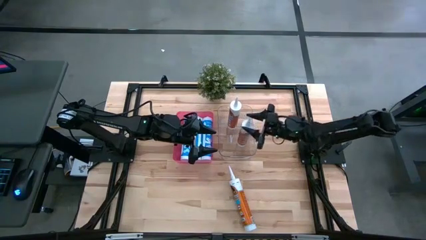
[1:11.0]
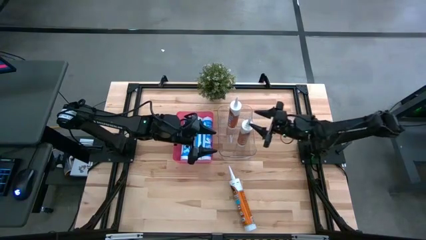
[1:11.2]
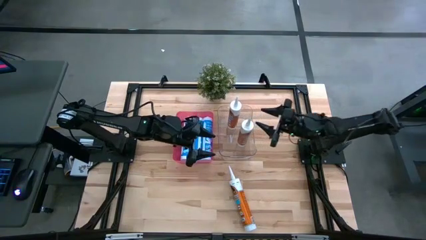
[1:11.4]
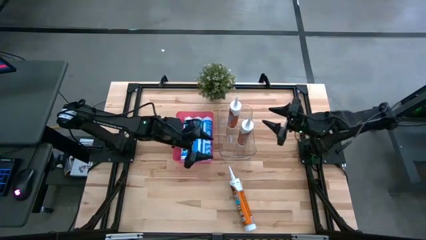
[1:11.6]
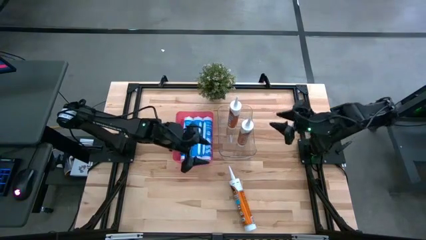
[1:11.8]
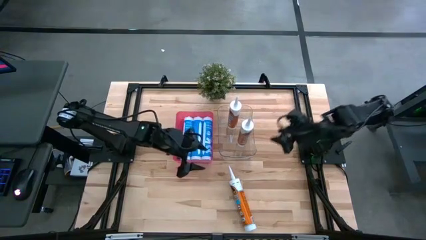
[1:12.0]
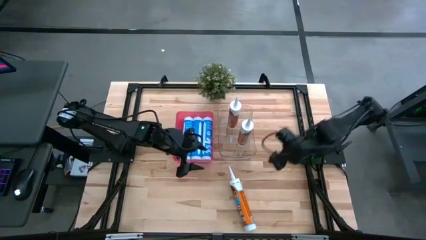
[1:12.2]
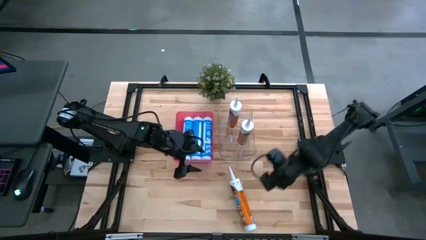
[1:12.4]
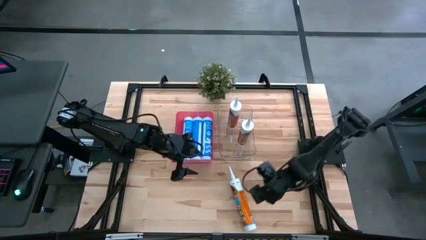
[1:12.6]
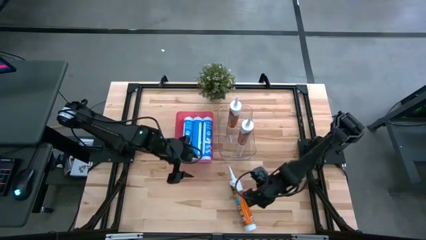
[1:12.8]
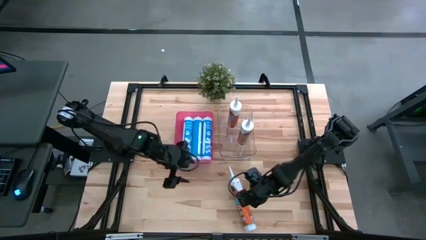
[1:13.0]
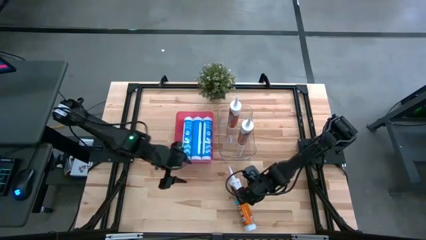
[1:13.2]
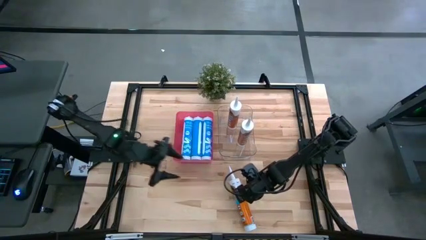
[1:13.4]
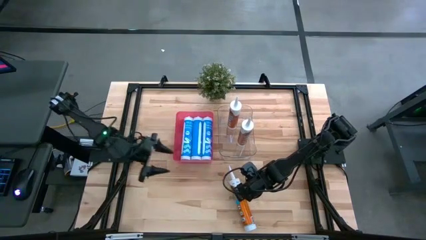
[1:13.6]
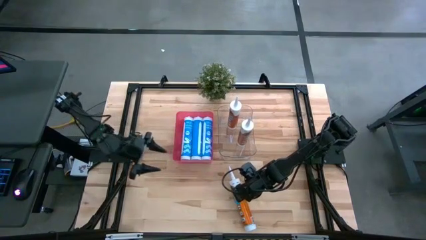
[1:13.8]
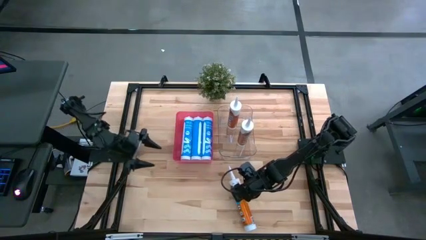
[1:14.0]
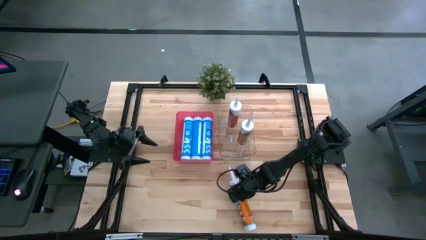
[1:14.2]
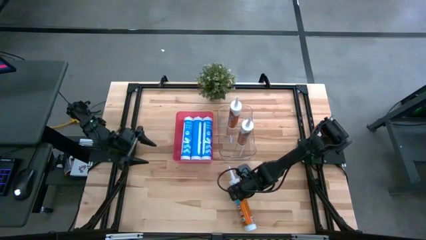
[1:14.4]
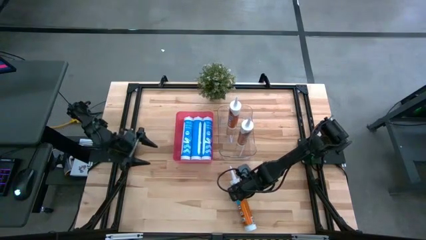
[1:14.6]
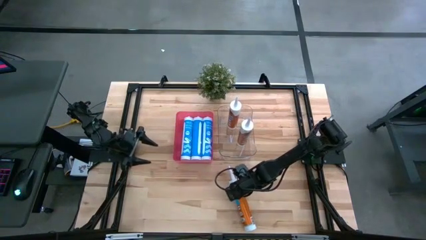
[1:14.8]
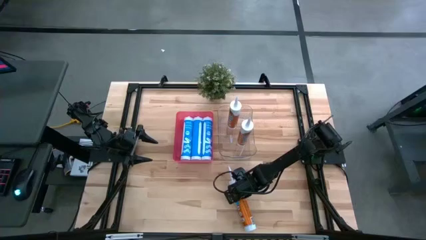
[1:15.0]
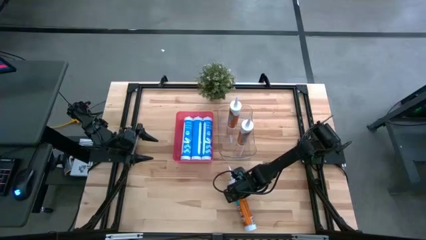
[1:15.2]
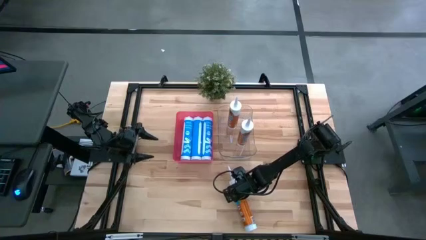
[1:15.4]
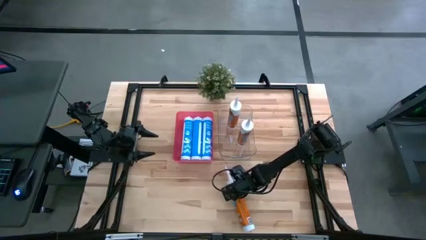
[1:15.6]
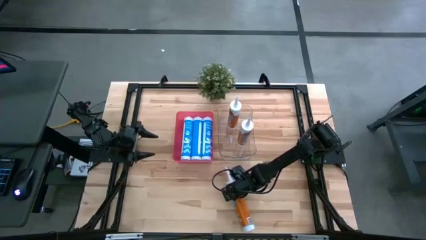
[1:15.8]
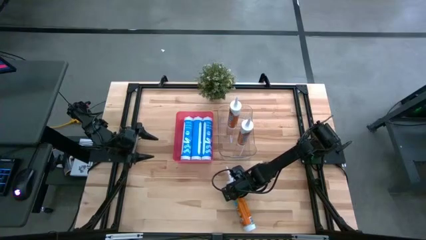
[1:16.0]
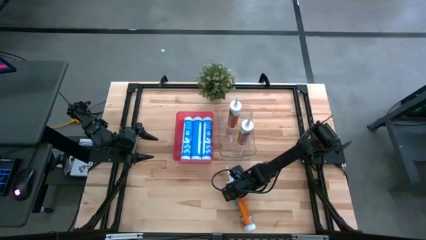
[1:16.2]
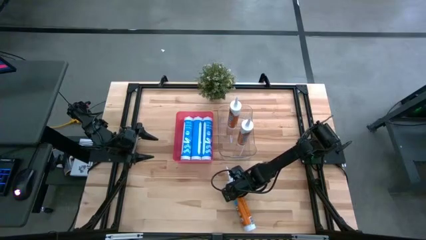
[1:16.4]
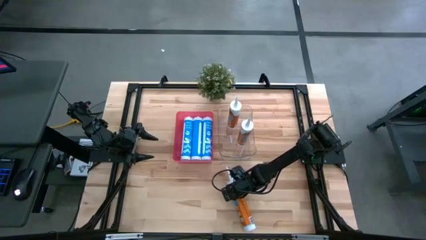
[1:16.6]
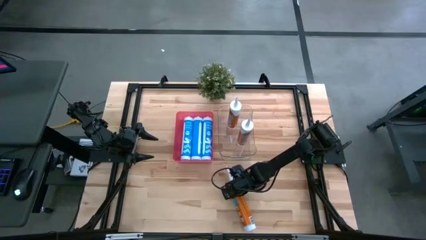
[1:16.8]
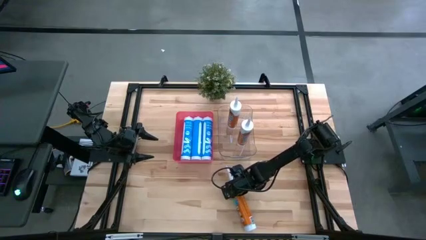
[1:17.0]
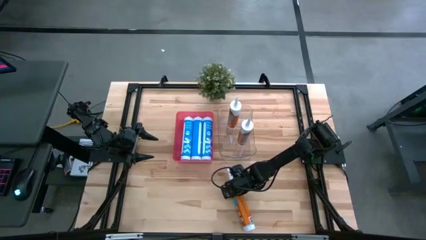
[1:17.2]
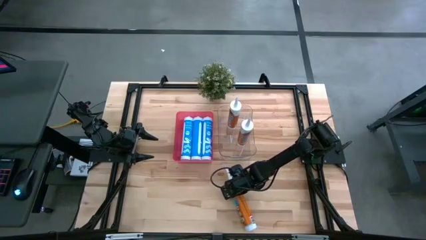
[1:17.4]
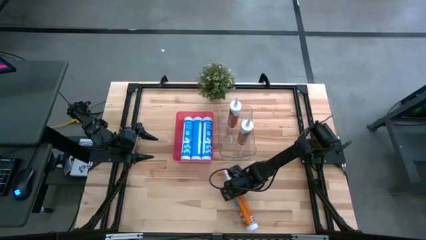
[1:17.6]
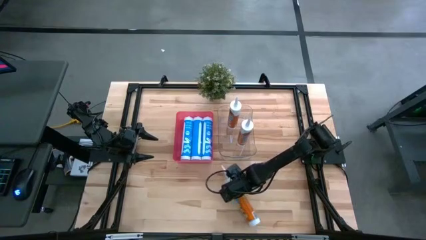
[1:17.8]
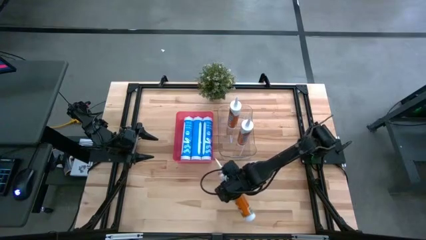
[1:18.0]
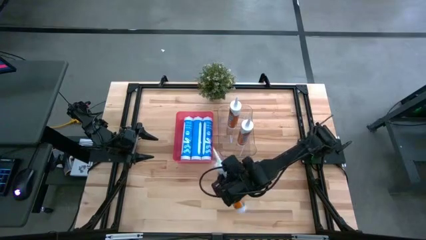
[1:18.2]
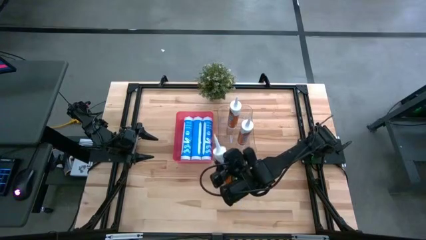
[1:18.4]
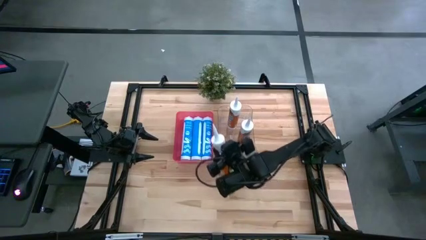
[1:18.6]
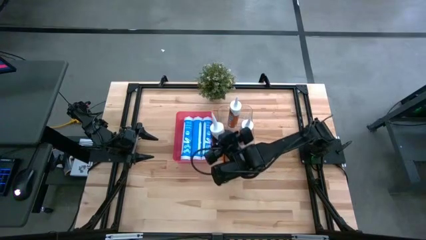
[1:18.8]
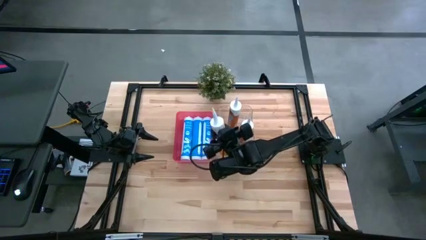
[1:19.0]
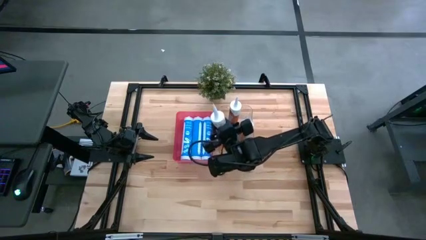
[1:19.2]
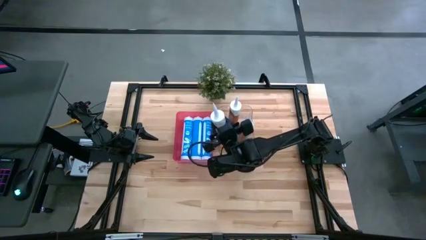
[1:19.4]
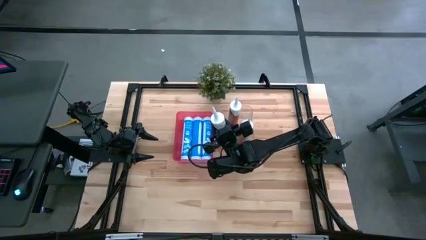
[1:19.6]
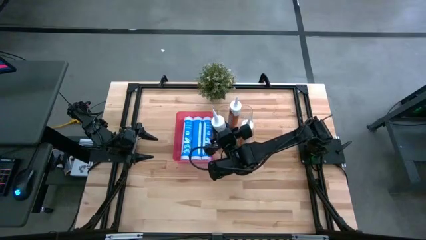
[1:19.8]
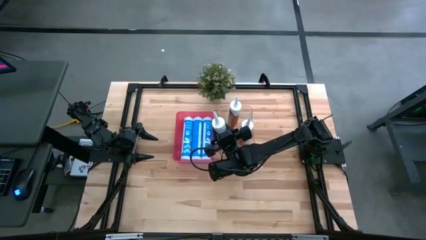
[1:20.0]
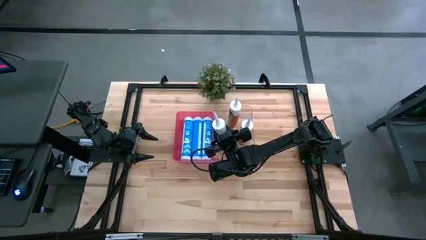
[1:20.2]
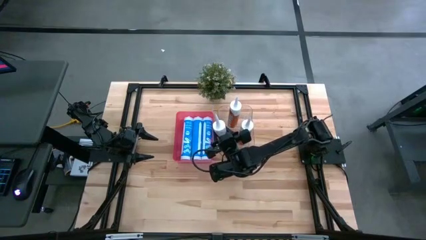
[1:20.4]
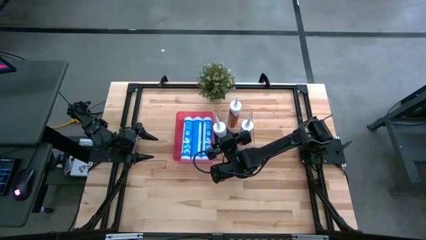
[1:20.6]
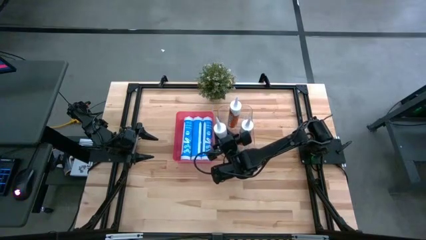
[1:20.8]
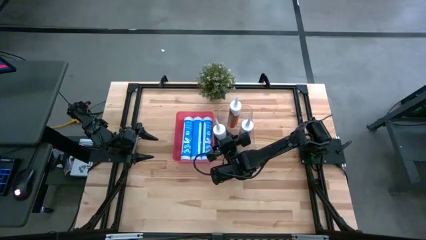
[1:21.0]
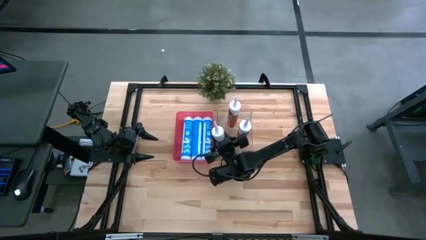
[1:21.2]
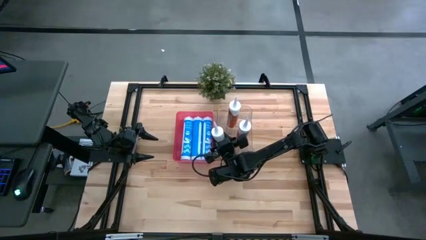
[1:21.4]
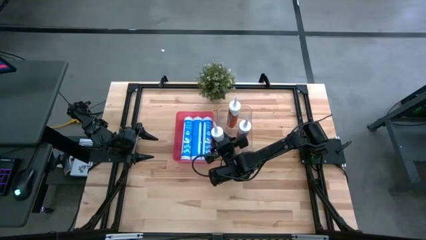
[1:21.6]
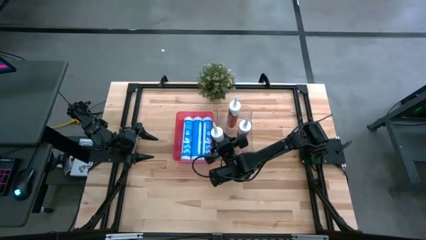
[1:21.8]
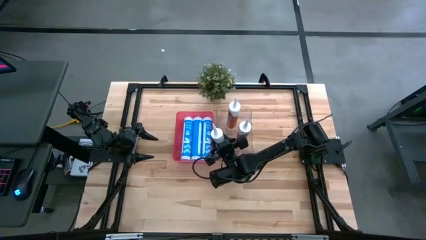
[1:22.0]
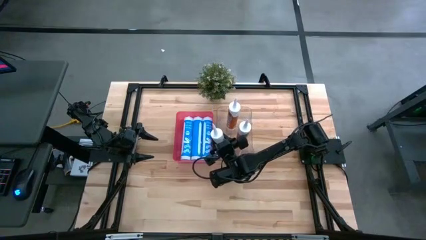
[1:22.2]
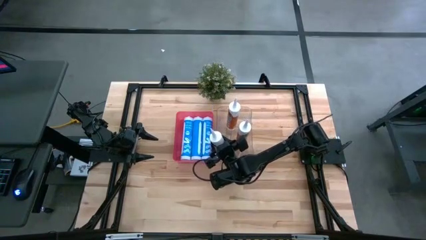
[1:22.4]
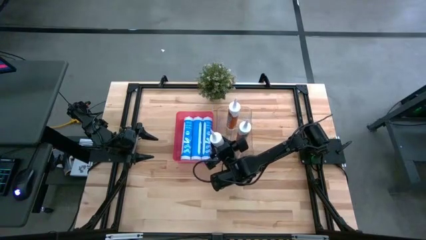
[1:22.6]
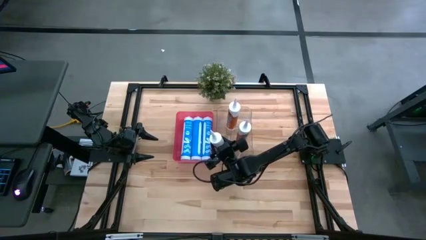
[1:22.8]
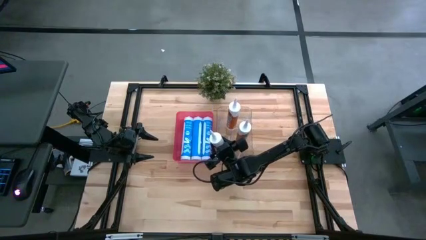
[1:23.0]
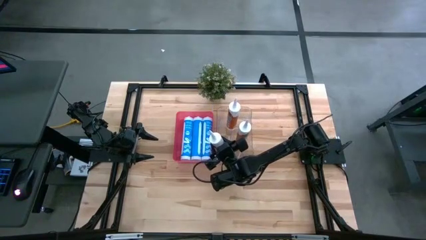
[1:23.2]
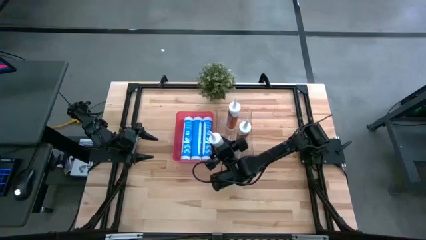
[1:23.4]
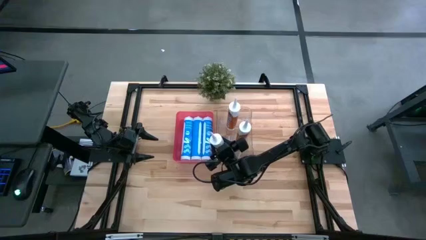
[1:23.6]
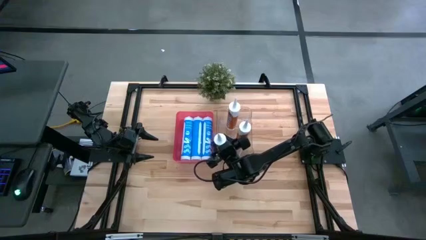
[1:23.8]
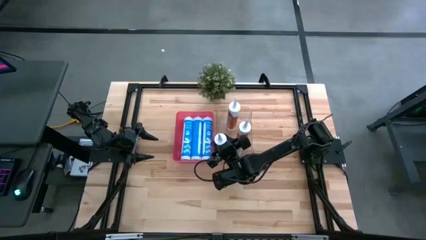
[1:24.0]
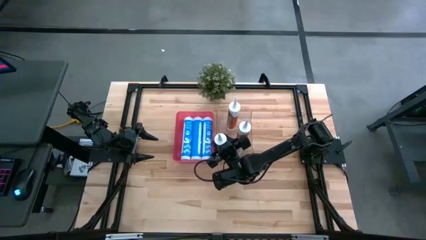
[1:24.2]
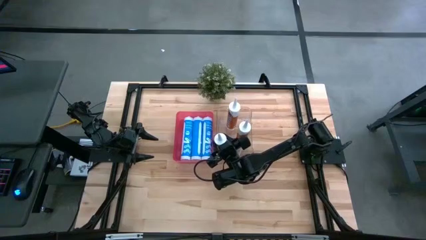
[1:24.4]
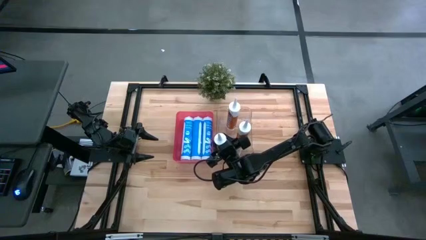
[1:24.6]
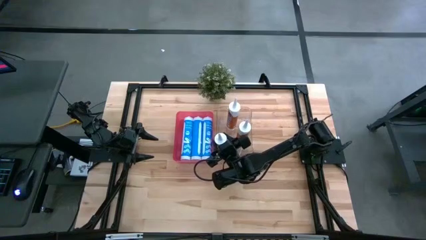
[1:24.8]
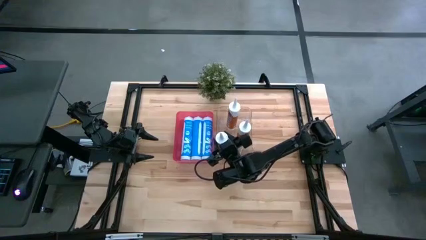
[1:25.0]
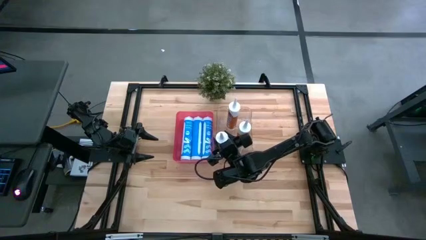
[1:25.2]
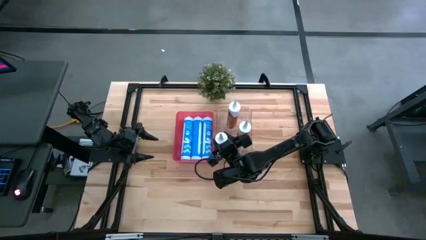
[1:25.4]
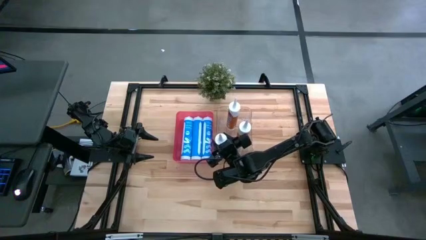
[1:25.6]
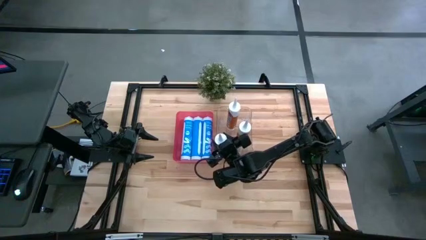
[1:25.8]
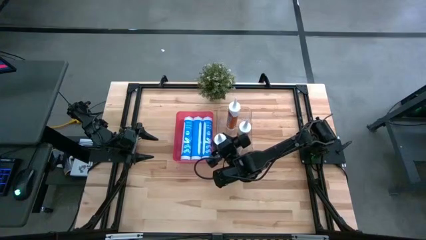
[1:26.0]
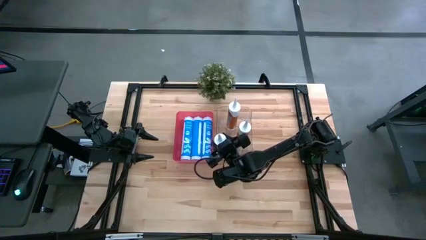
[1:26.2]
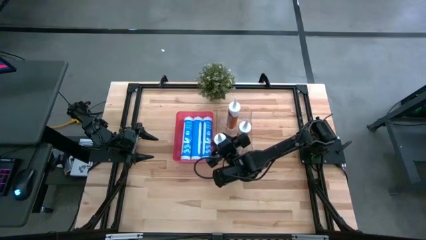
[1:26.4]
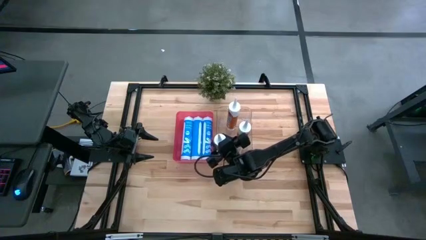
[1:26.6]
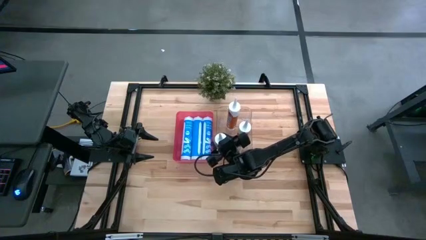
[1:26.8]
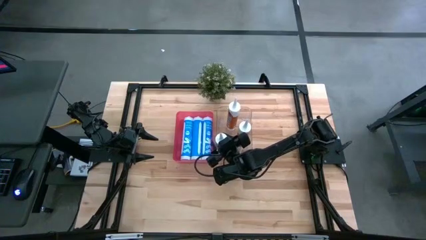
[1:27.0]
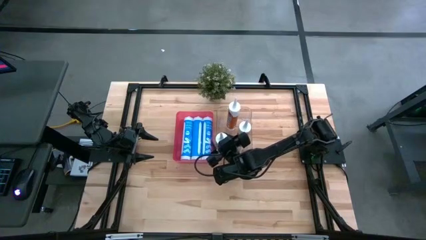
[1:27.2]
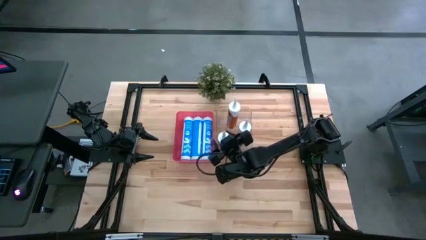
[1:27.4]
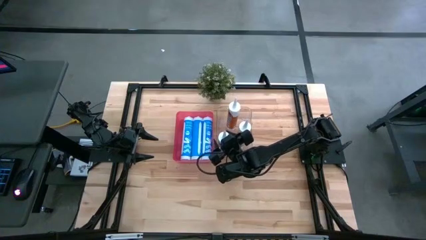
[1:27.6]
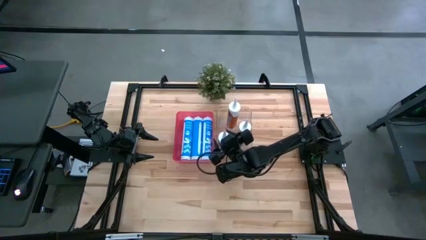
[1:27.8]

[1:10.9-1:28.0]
Task: Pick & place silicon tubes, Sealant and Lysol wipes
Put the orange sealant into the transparent bin
